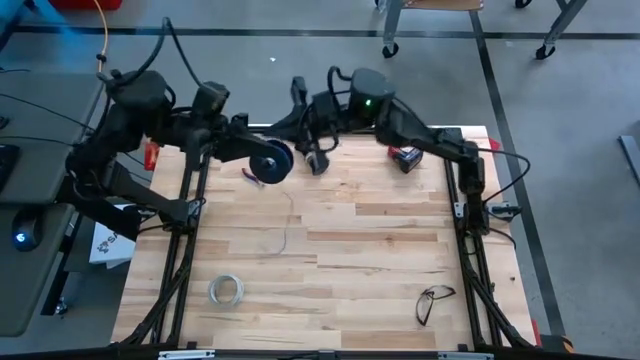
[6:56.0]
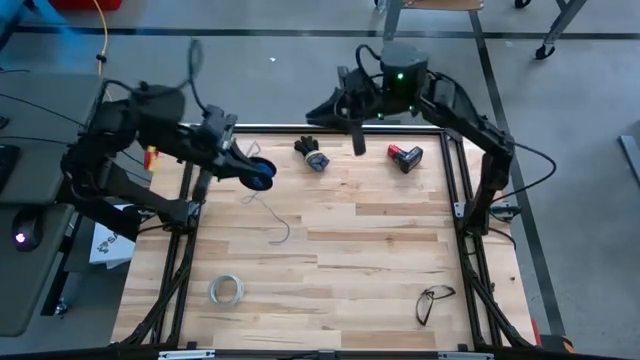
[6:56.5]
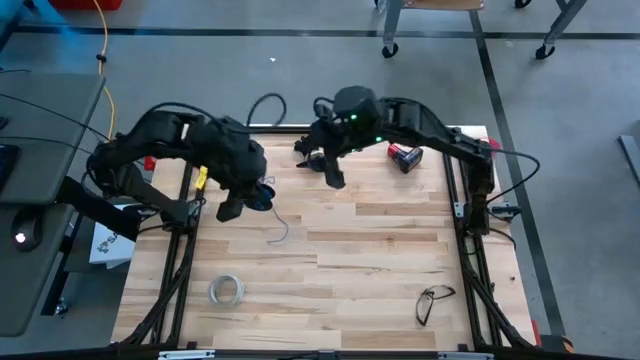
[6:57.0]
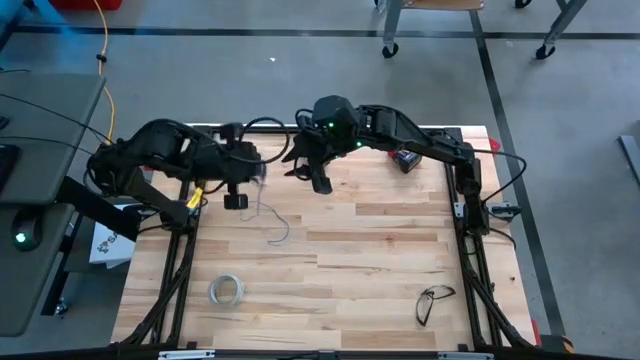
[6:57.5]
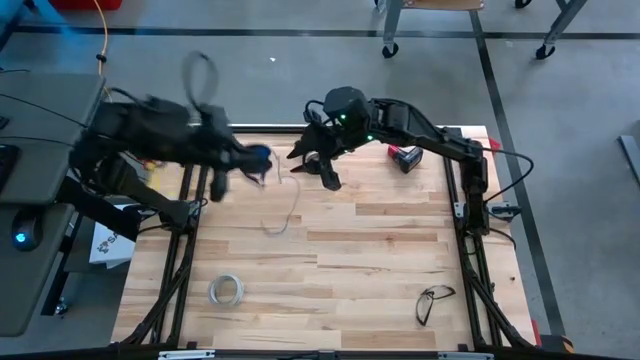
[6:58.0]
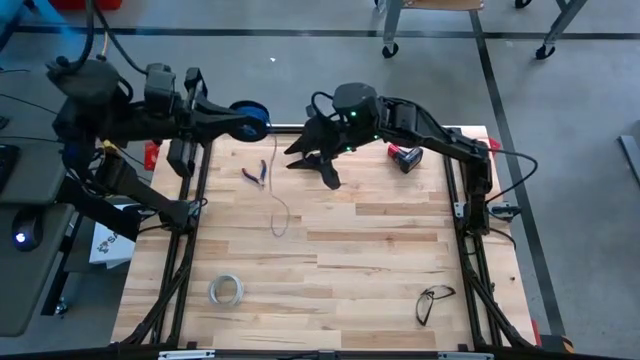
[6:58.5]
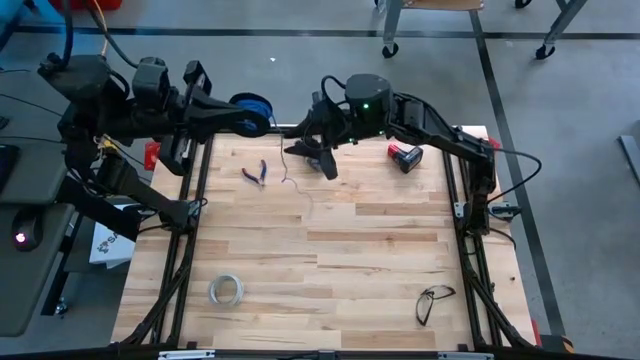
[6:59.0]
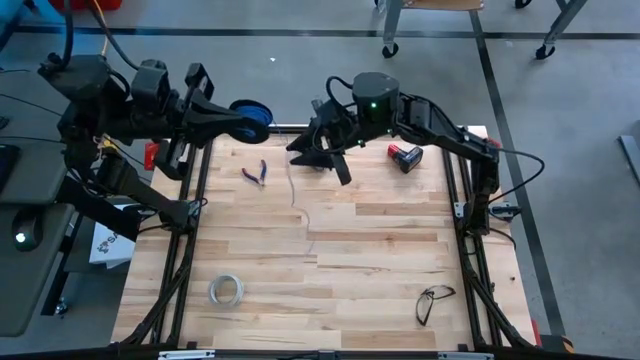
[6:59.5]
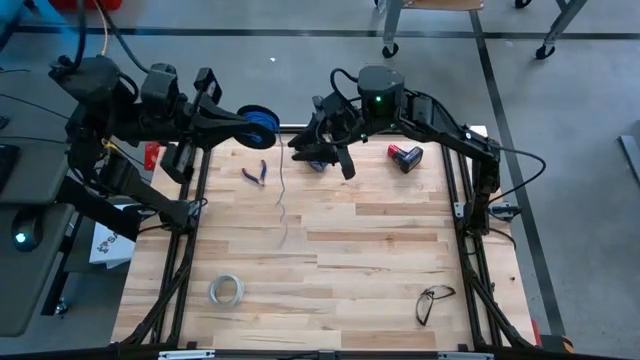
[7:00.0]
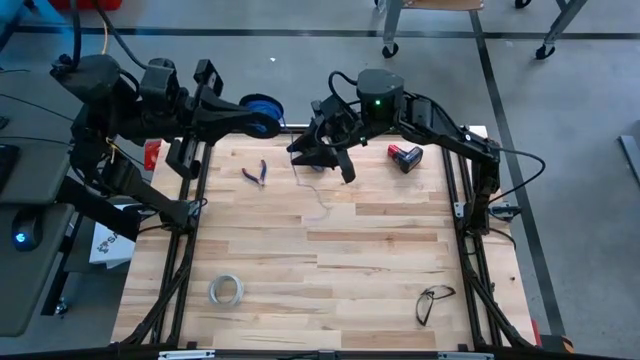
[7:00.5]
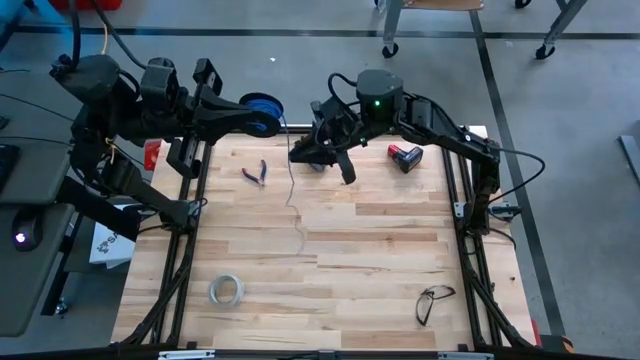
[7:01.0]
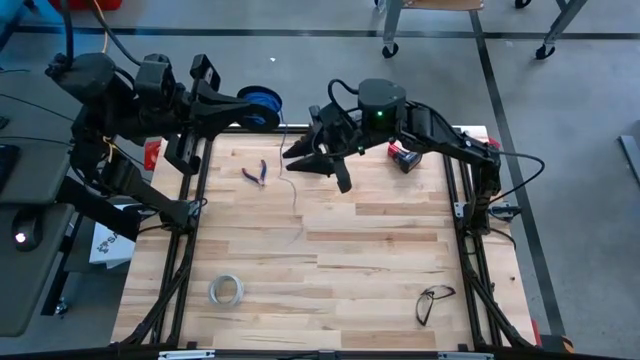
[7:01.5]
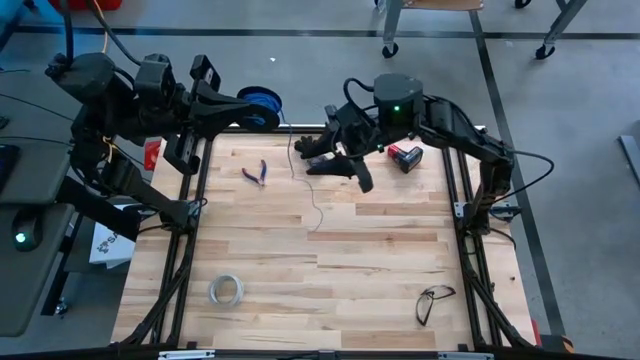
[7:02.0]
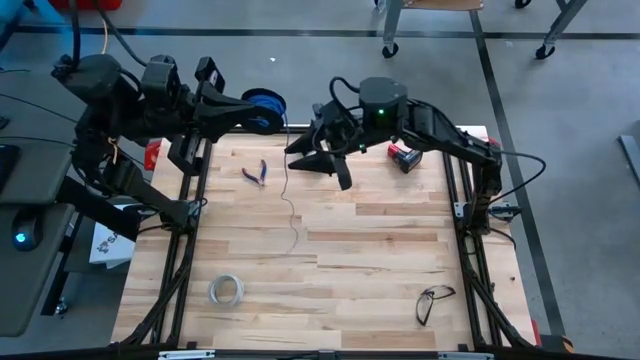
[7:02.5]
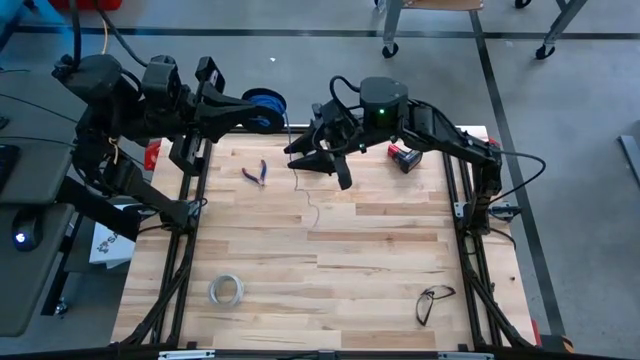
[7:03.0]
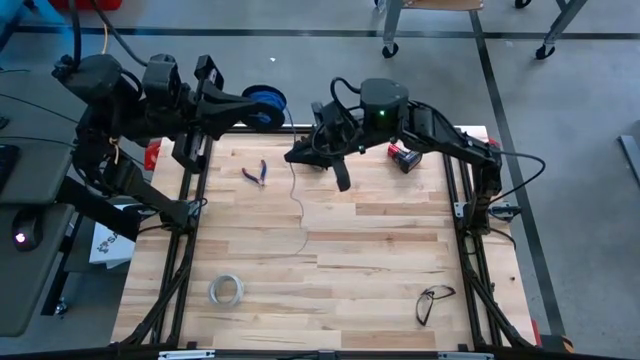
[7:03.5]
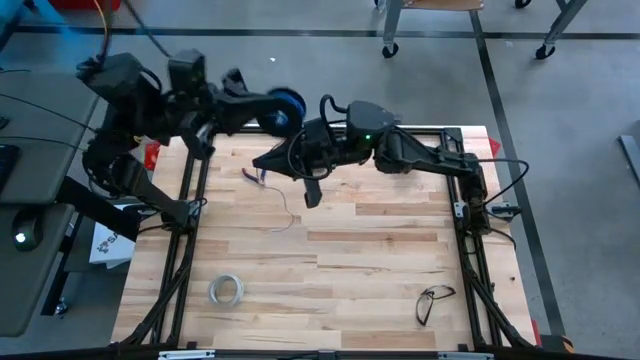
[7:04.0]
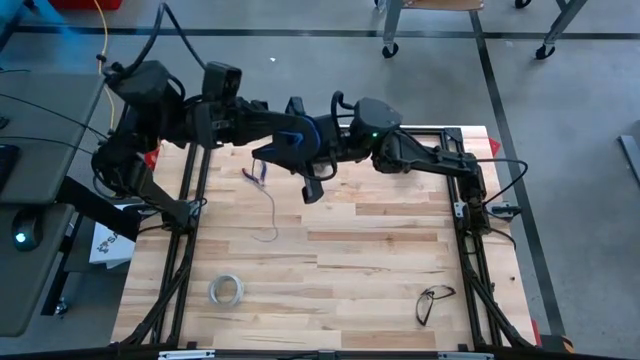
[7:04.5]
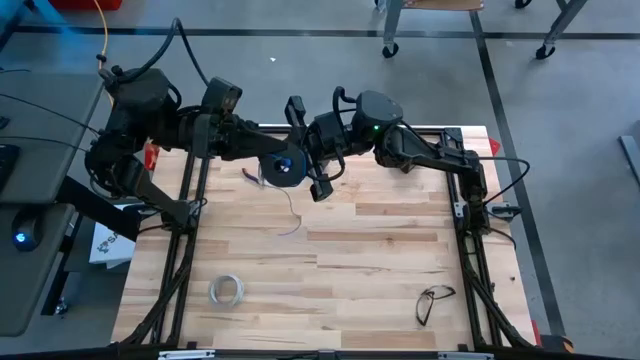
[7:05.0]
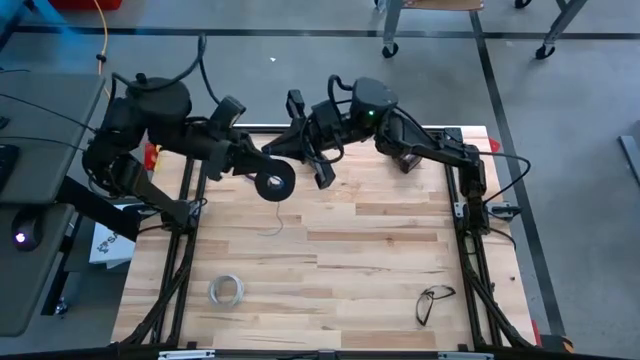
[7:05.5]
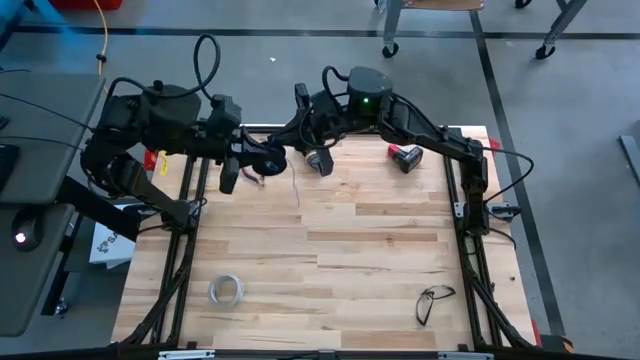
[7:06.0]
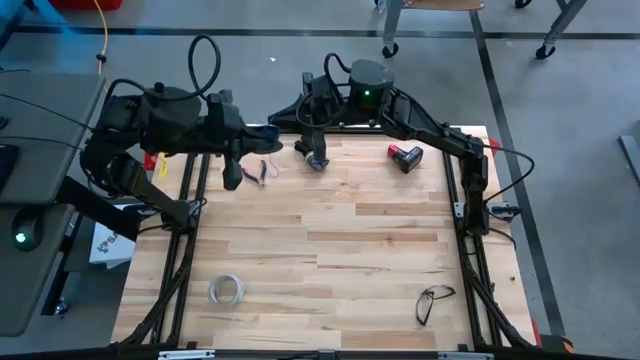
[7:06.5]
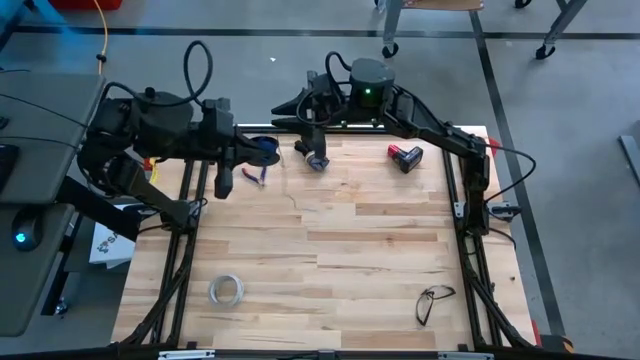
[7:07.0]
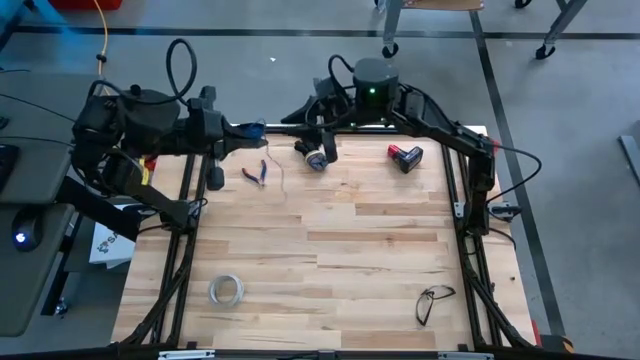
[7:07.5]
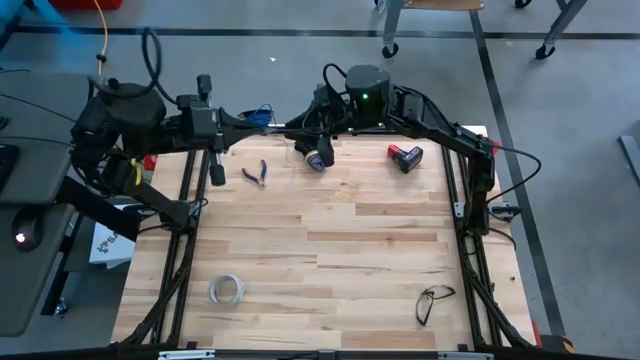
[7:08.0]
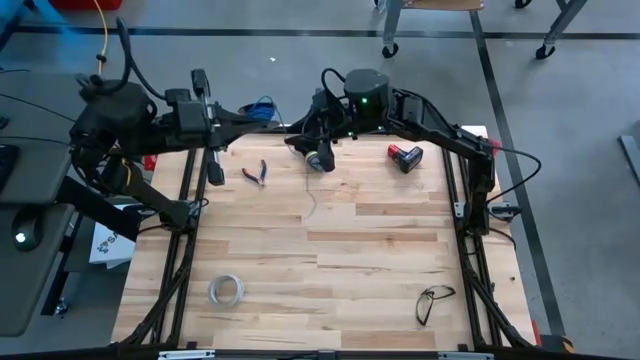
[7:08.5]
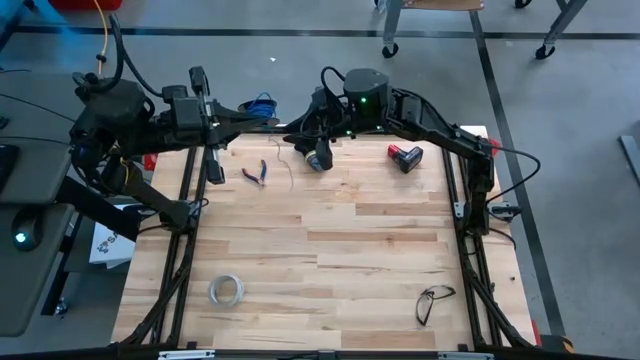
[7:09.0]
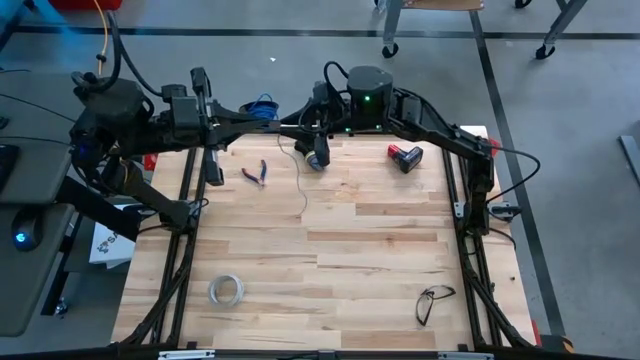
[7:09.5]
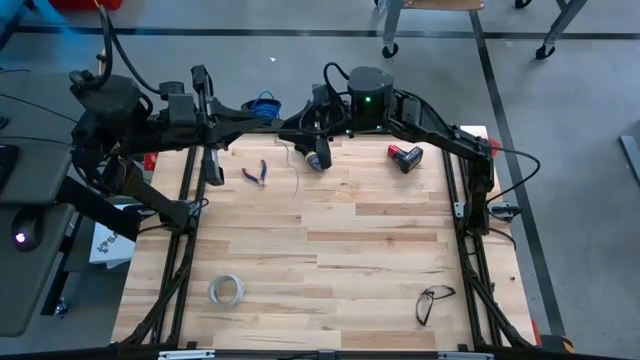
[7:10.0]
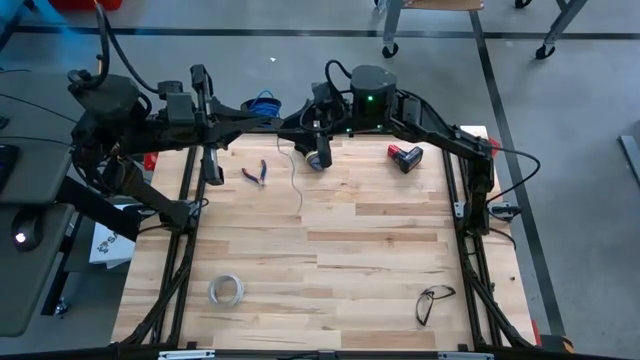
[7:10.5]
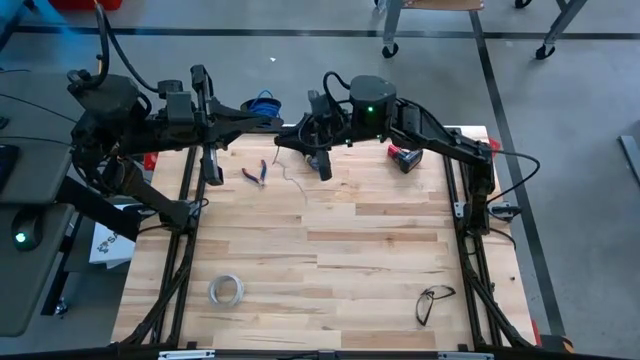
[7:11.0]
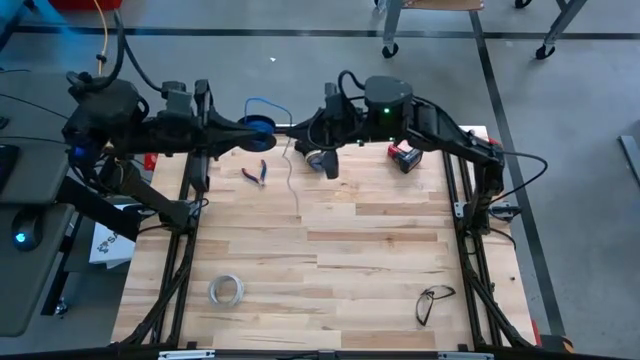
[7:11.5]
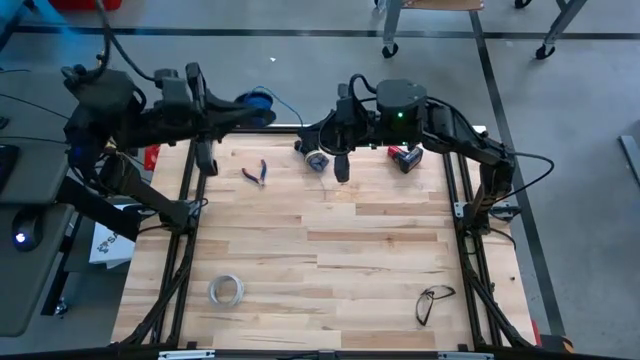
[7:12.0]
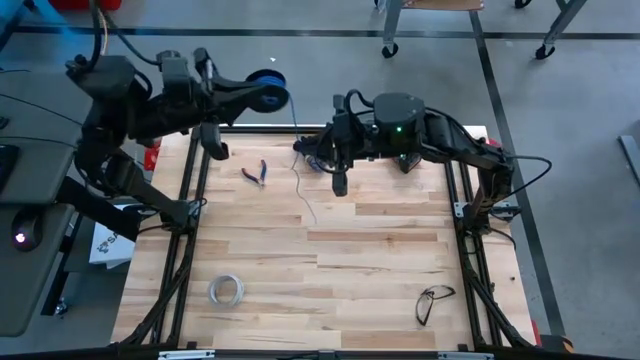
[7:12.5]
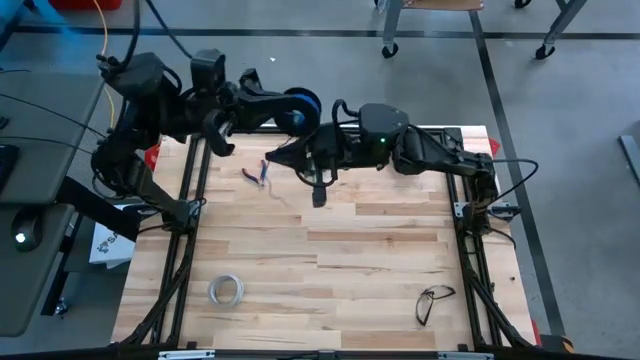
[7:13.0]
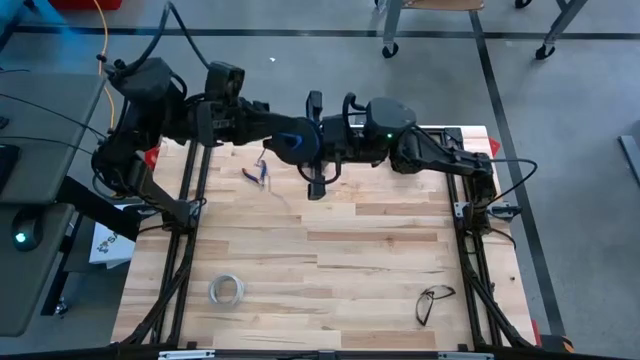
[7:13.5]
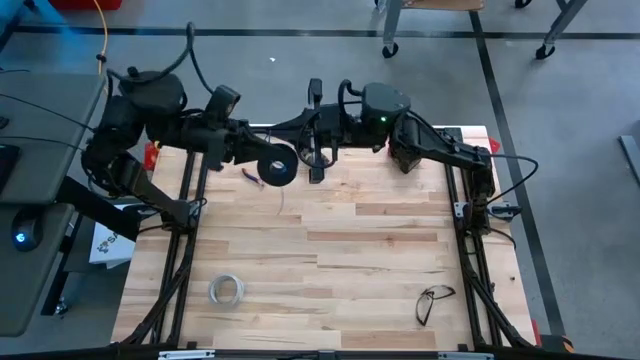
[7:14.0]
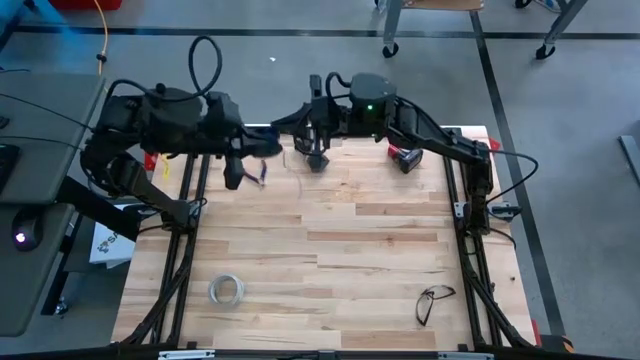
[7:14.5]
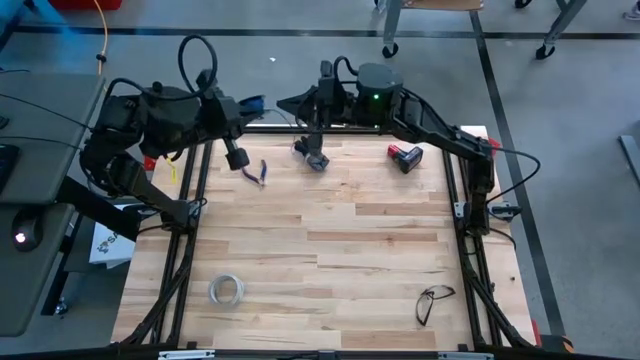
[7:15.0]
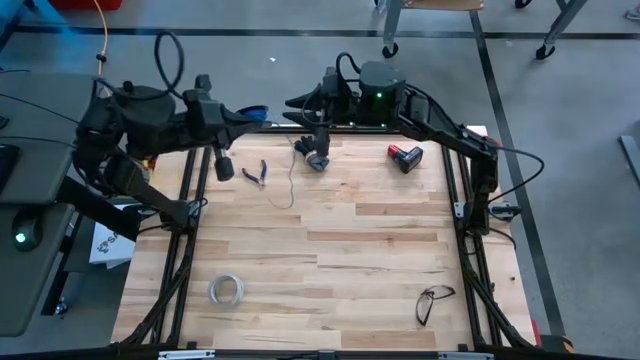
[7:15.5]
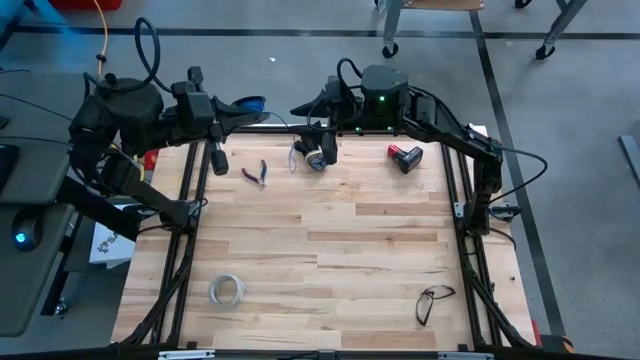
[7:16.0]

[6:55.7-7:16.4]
Task: Coil cords
Coil the blue wire onto the black spool
